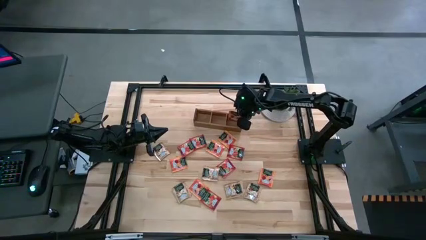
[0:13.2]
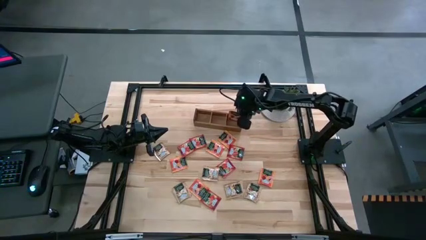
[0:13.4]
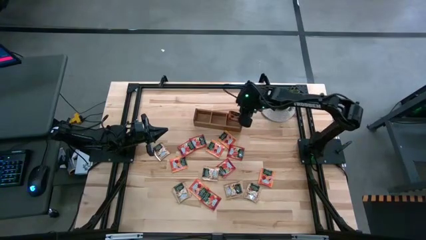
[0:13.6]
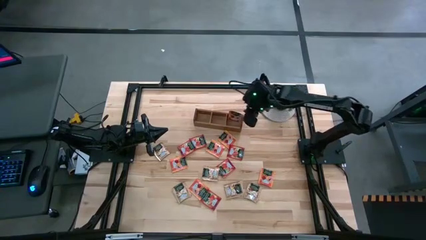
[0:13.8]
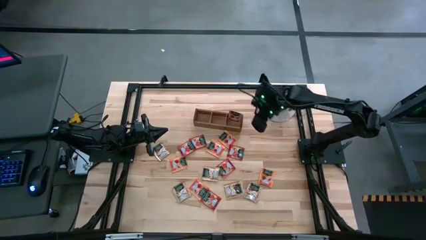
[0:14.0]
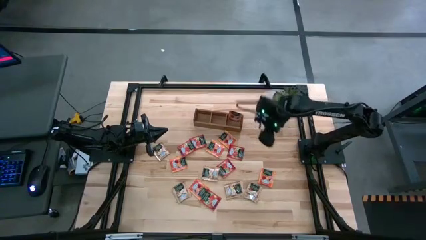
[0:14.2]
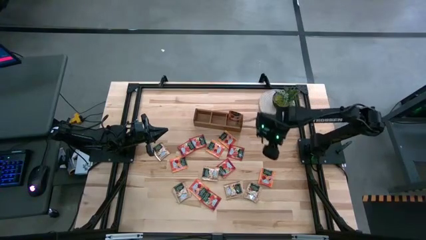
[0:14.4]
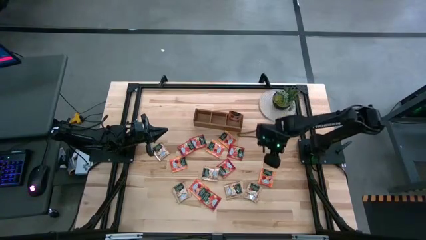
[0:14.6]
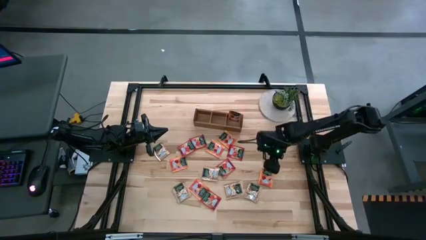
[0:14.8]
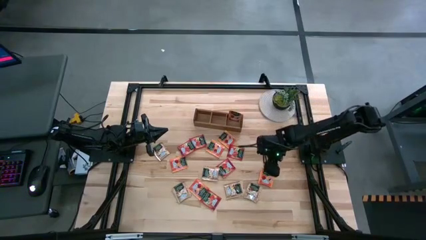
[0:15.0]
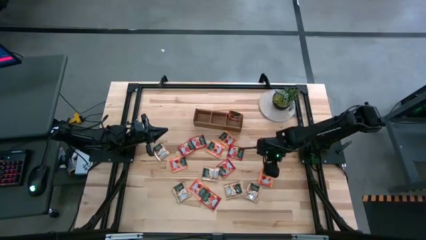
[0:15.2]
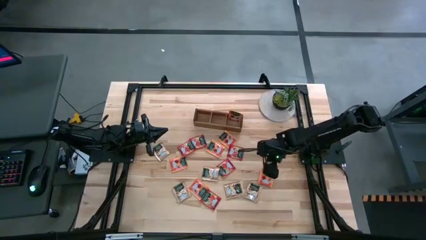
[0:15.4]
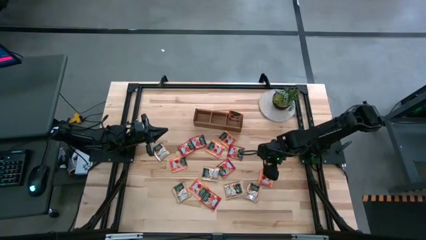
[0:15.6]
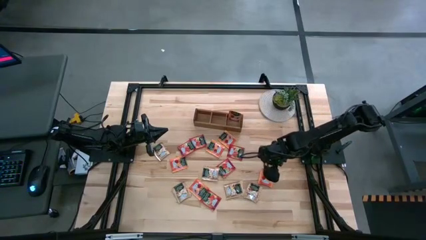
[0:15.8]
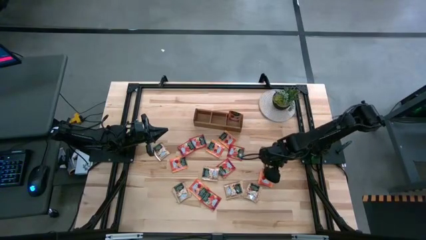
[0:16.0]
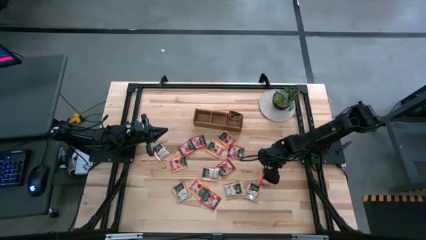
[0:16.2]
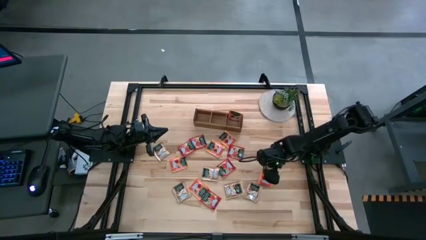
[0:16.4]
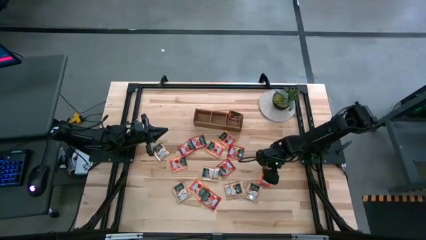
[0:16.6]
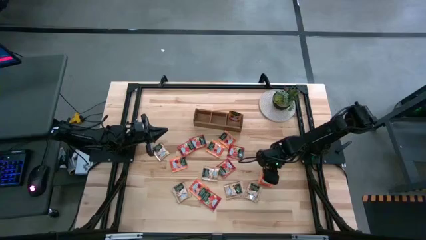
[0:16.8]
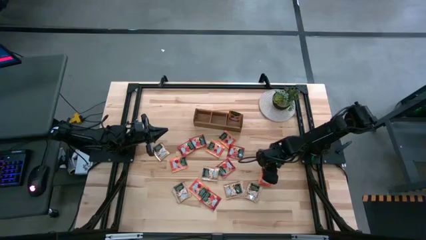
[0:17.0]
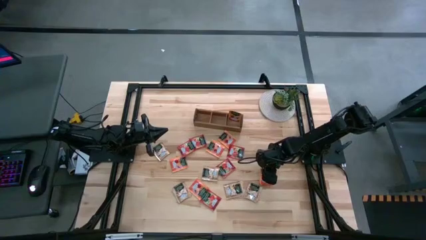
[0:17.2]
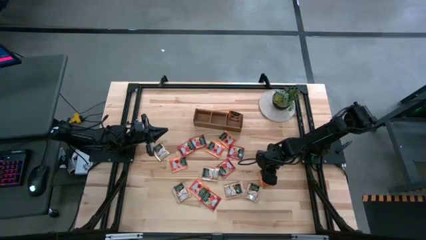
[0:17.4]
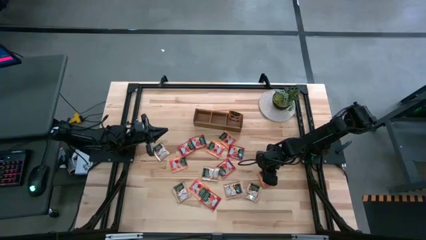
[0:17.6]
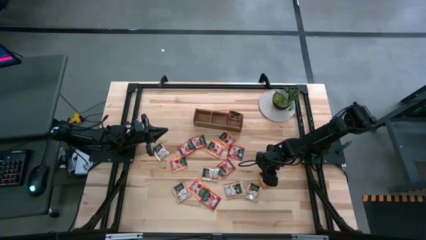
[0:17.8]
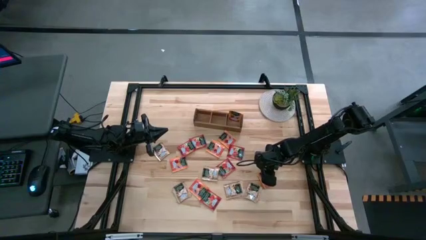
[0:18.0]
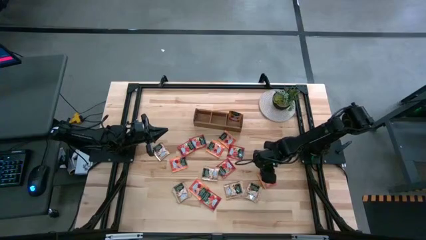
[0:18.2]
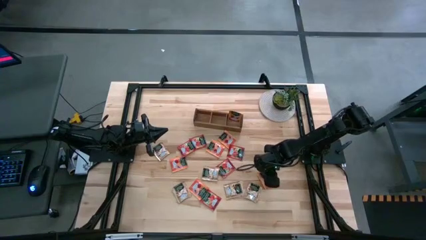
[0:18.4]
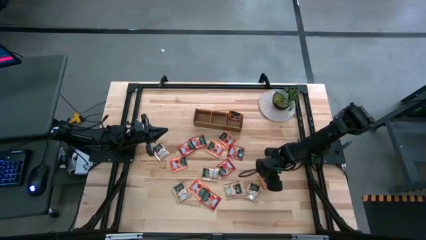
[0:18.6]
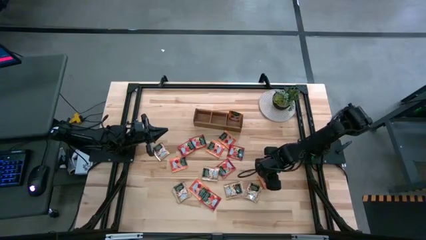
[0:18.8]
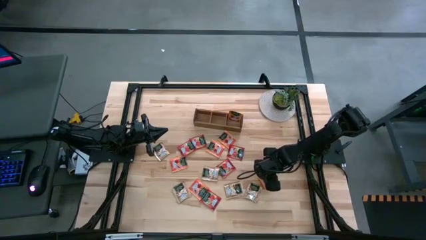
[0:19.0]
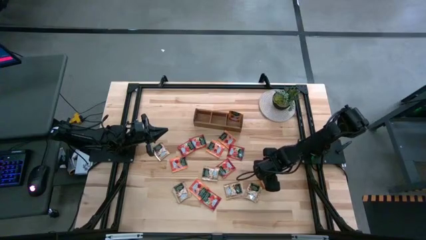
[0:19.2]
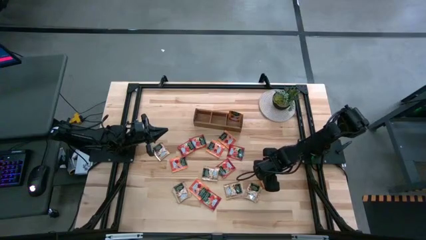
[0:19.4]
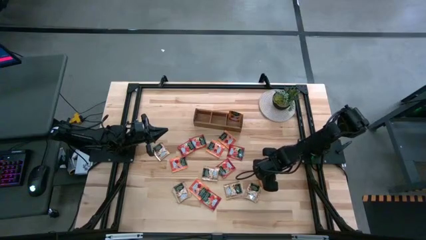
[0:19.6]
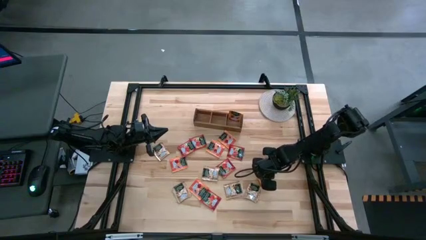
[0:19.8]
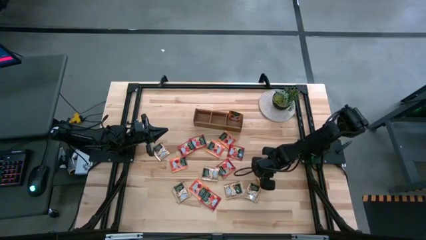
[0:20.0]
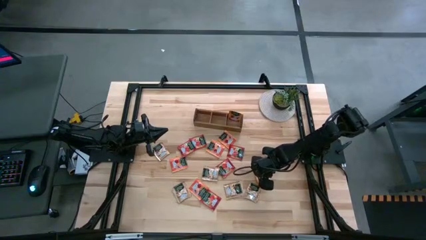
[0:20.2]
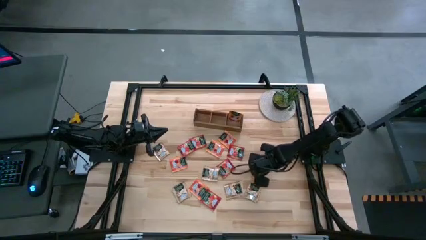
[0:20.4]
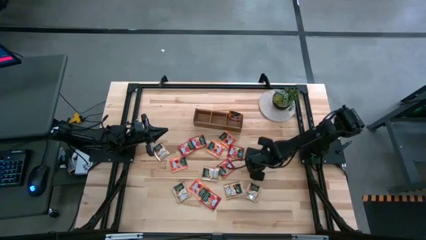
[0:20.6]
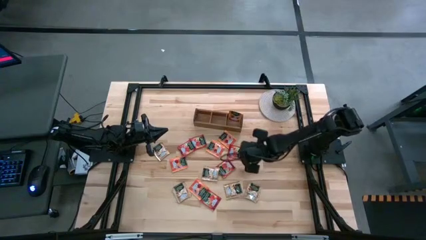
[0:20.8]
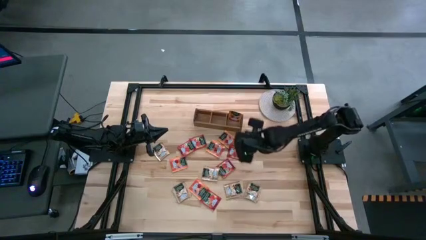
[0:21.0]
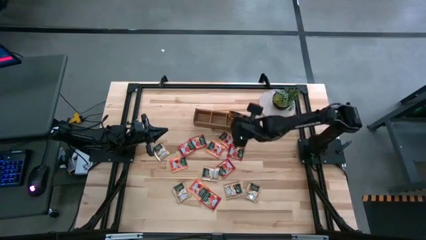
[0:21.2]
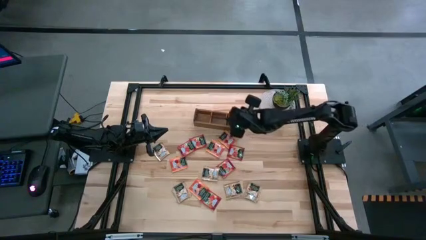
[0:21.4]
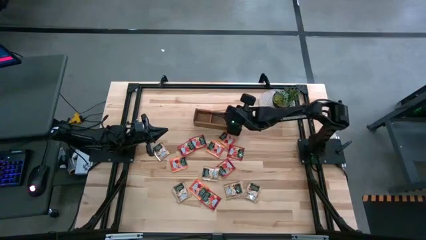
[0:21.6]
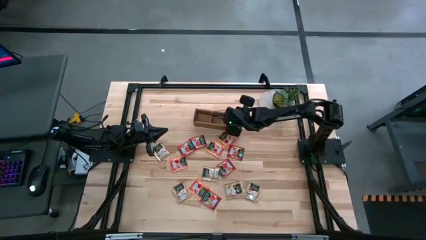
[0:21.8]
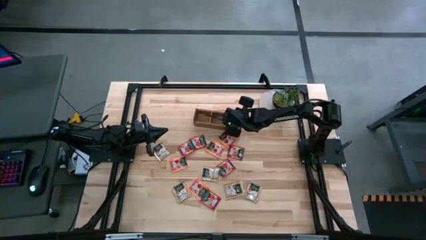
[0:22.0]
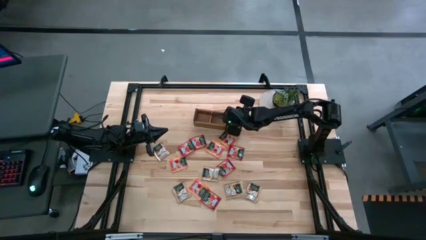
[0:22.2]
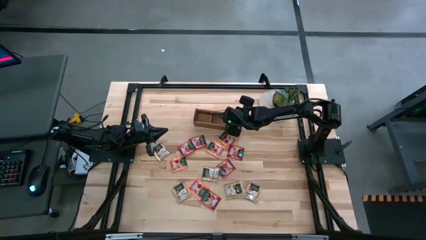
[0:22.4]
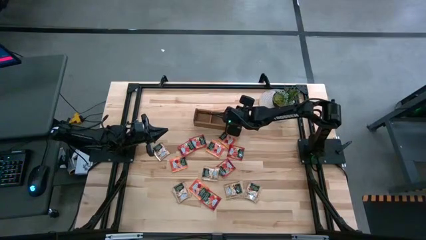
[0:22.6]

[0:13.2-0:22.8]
Task: Pick & Place Tea
Put the orange tea bag into the right section of the wooden organizer

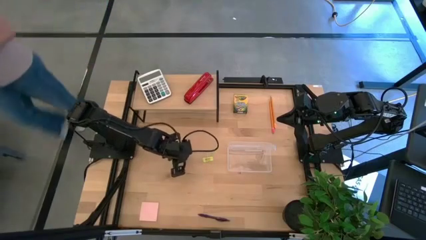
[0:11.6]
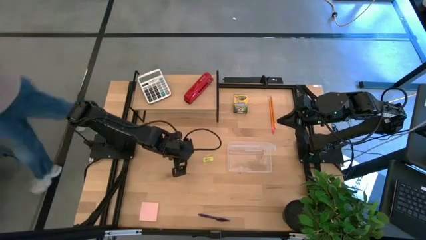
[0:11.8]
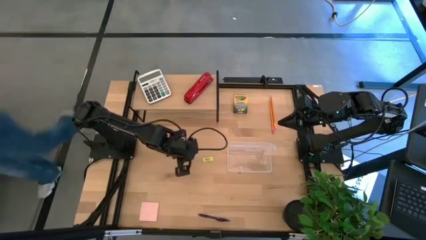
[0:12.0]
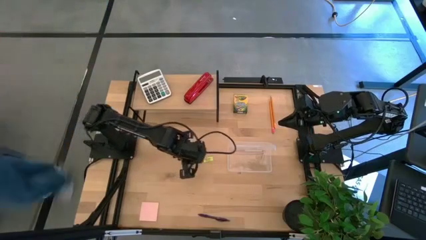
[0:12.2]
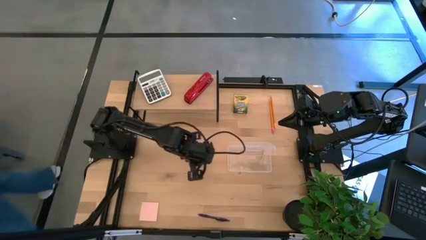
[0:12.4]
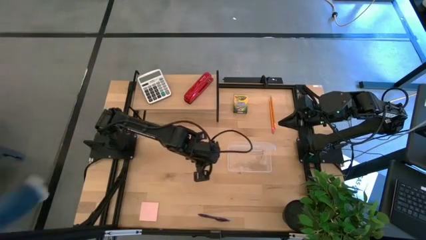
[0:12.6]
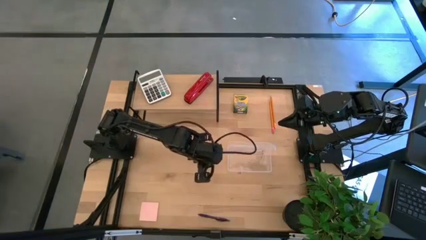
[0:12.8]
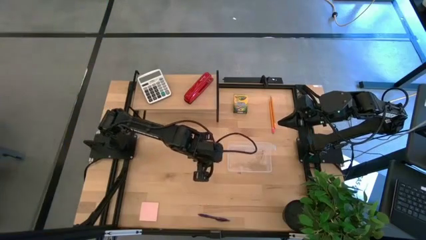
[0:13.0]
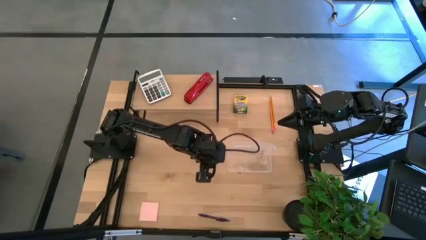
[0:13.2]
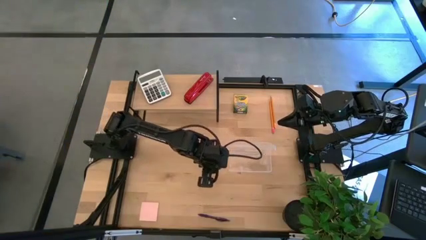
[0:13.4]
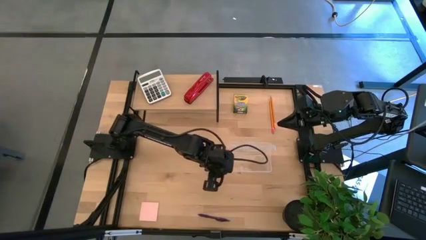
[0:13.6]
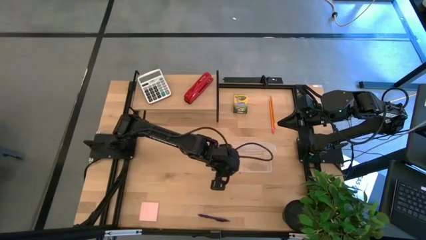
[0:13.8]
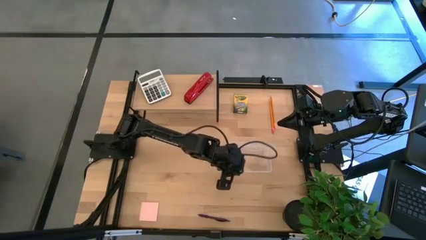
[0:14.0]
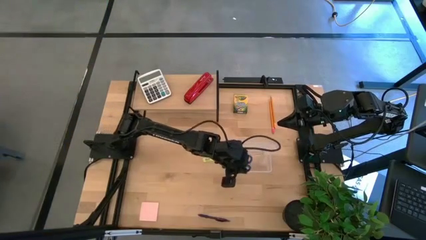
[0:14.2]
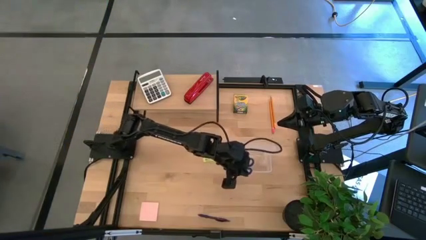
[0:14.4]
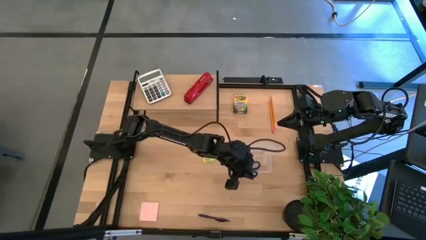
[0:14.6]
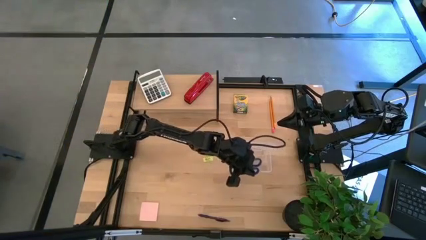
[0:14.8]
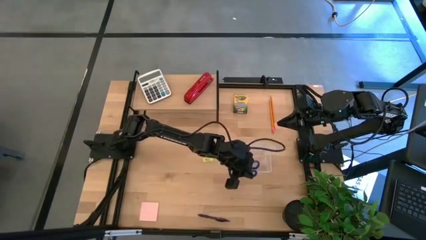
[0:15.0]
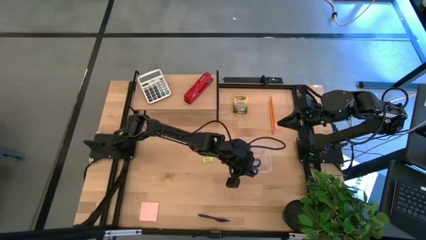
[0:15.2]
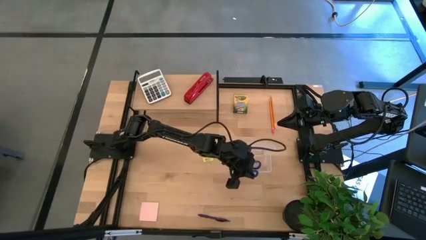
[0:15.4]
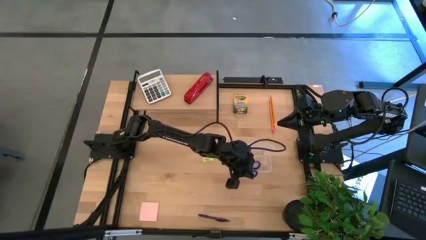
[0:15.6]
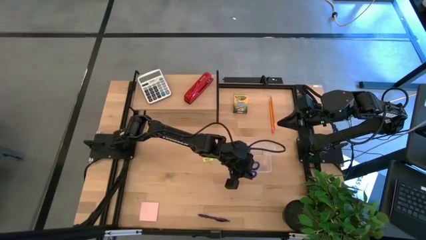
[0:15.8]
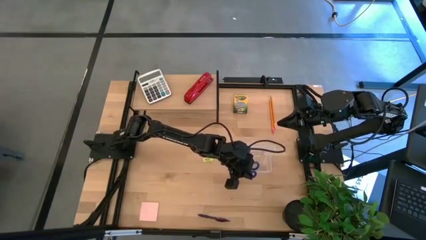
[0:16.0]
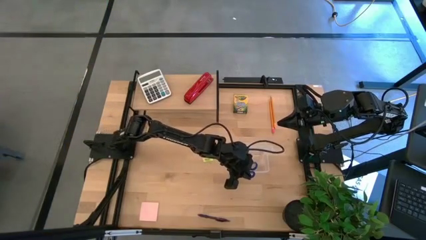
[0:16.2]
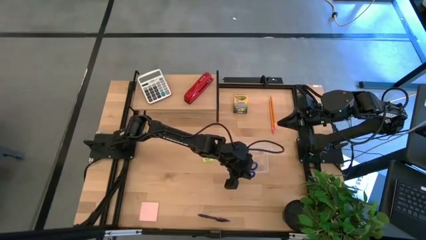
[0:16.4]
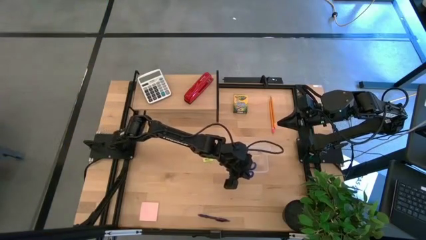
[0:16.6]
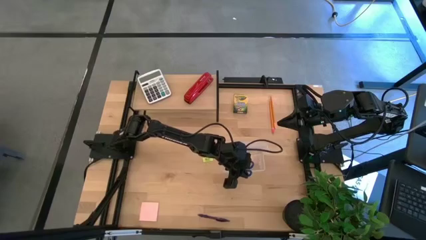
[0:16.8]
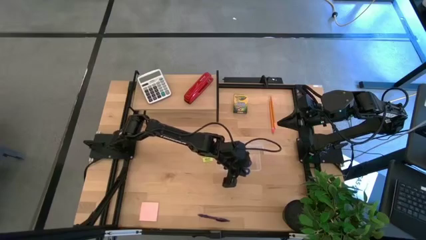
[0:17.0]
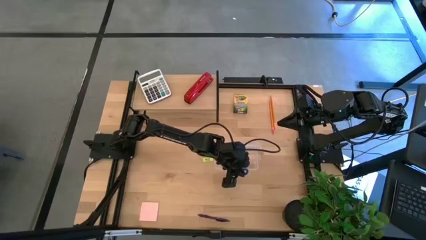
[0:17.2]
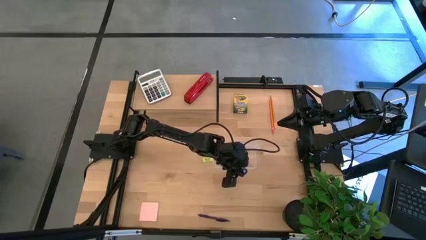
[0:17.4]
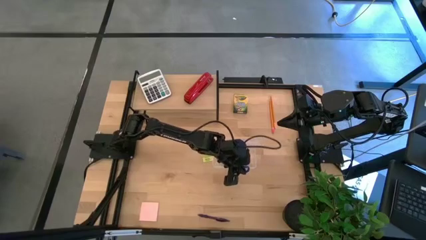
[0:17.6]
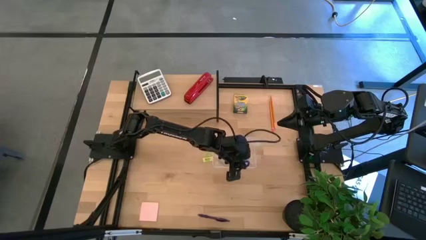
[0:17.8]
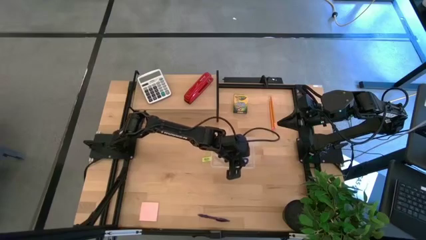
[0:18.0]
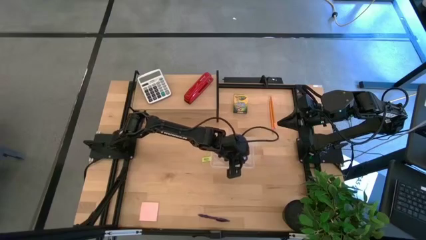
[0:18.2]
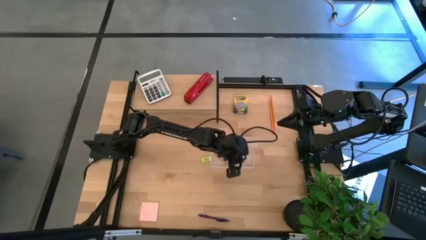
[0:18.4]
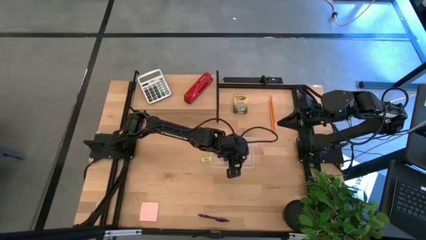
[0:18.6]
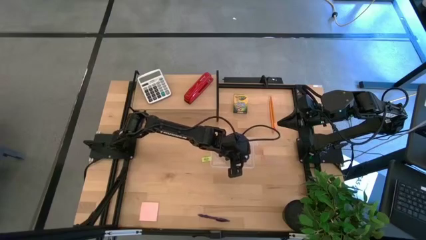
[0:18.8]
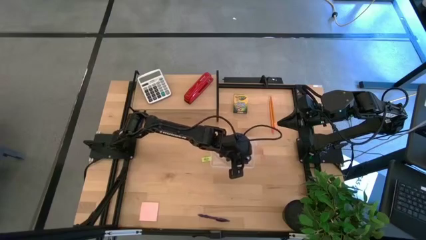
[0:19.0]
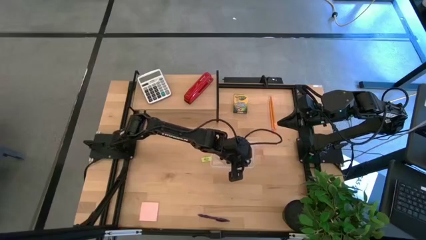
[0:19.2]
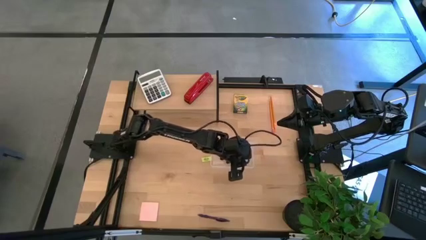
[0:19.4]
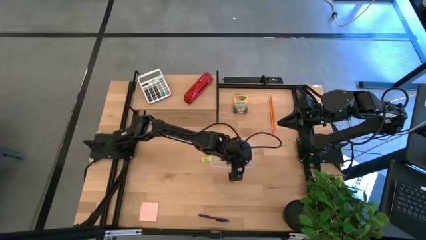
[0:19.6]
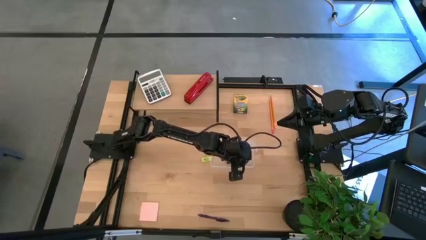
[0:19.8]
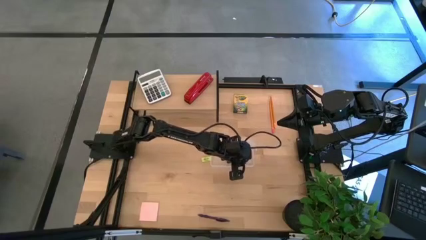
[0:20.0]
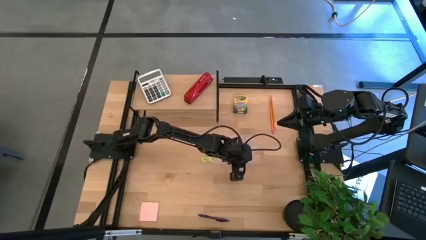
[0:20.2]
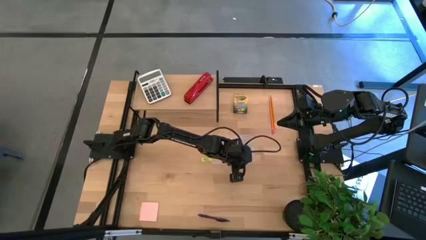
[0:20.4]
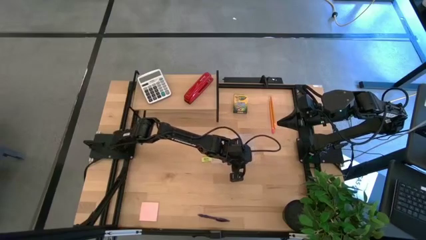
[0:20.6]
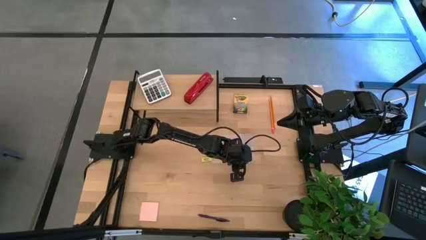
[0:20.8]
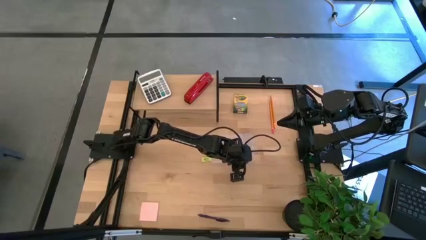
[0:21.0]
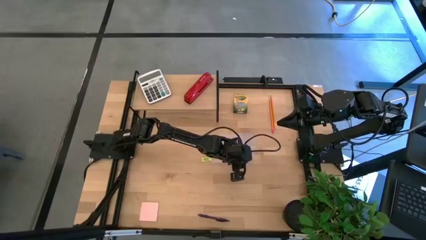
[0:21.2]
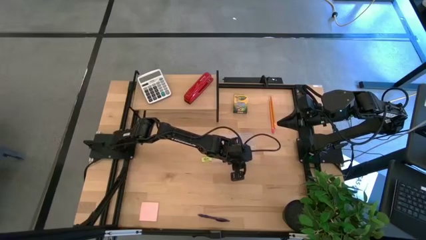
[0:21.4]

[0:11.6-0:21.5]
Task: Pack school essentials
Put the blue scissors into the supply box
